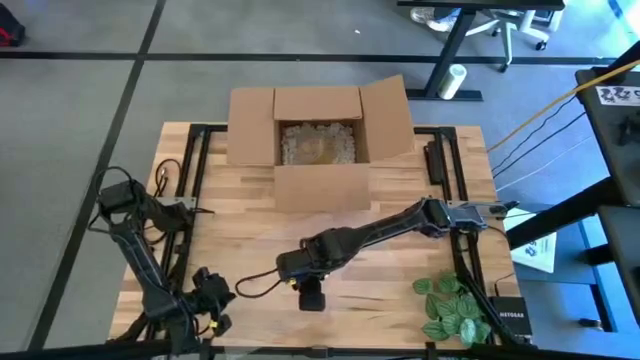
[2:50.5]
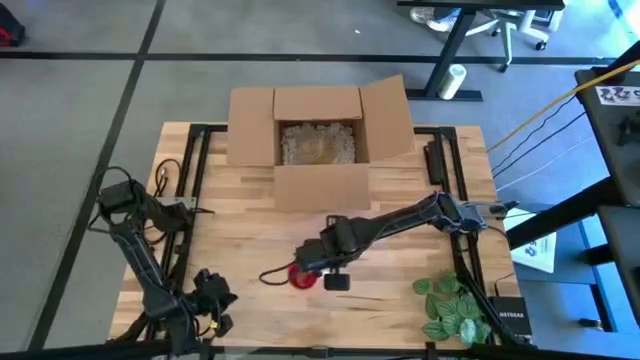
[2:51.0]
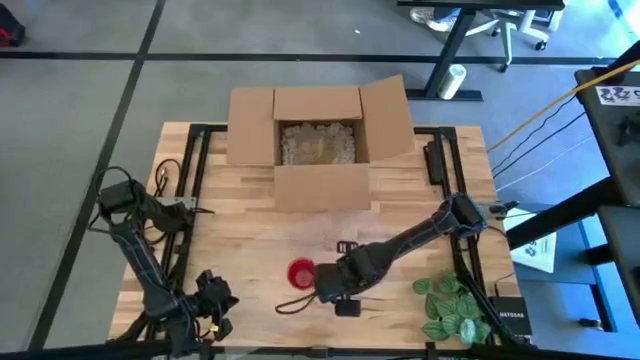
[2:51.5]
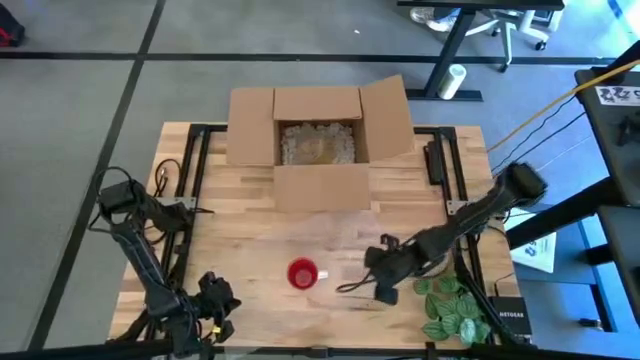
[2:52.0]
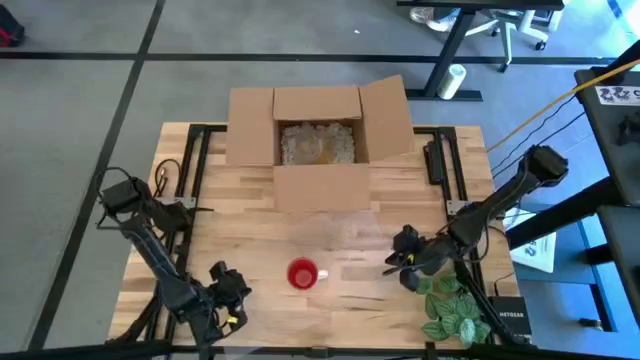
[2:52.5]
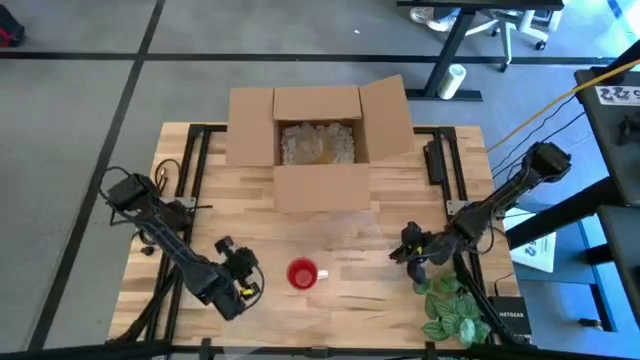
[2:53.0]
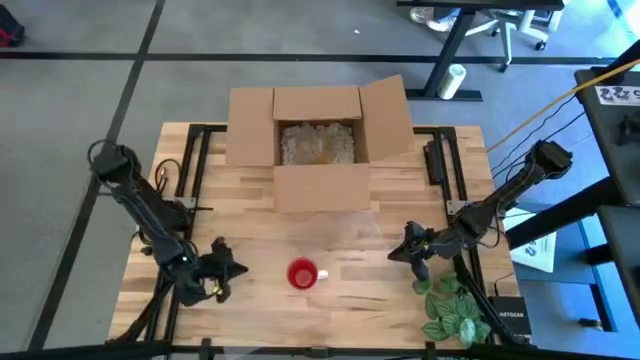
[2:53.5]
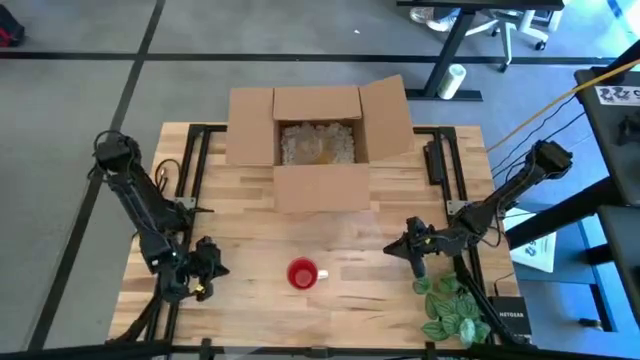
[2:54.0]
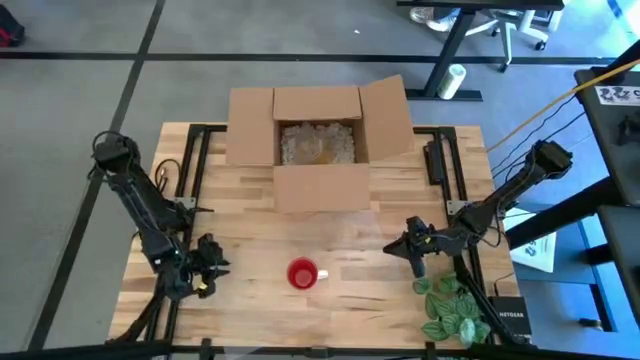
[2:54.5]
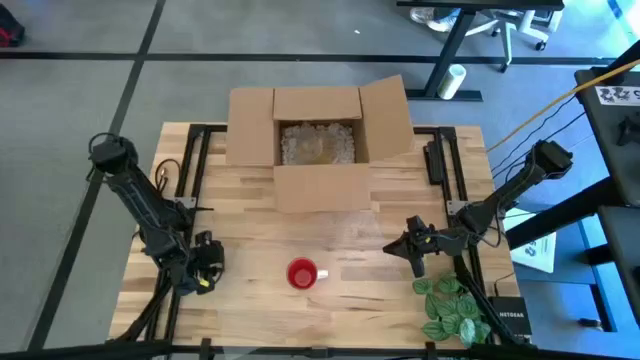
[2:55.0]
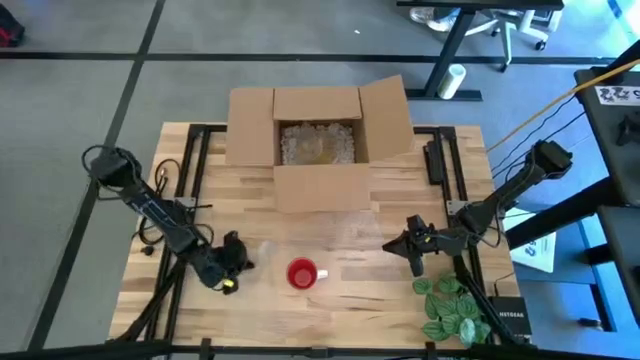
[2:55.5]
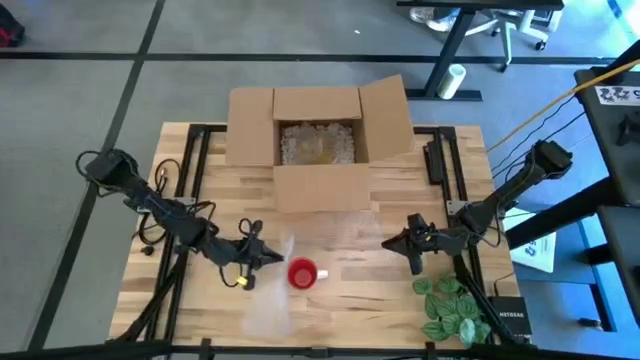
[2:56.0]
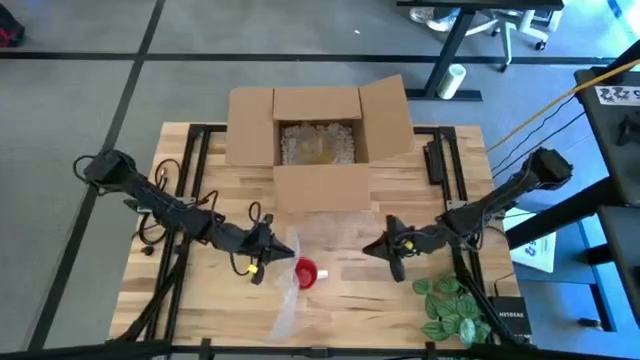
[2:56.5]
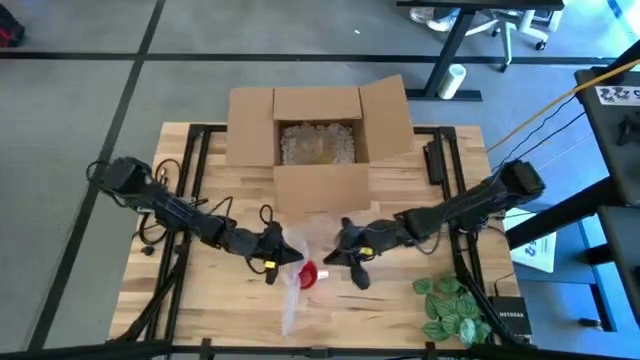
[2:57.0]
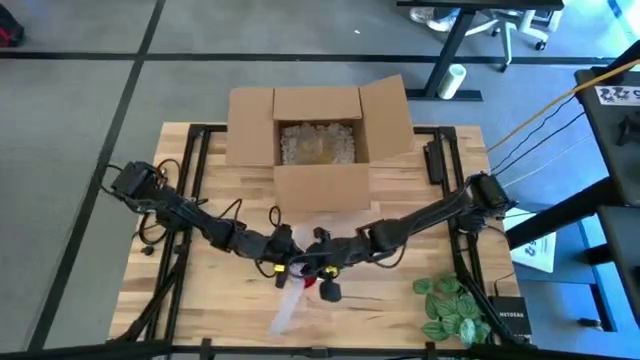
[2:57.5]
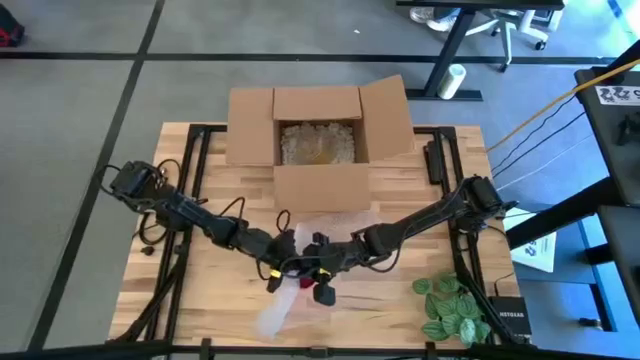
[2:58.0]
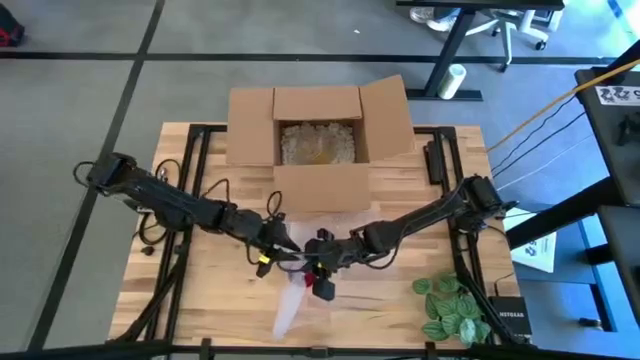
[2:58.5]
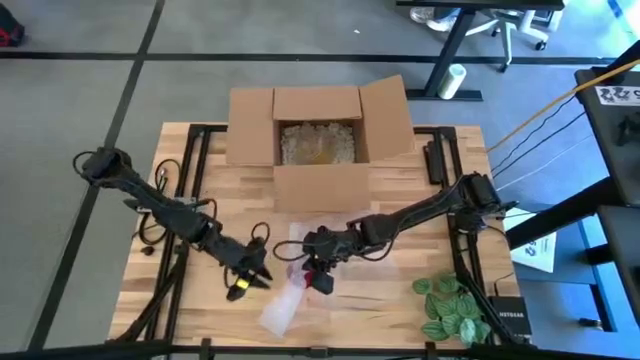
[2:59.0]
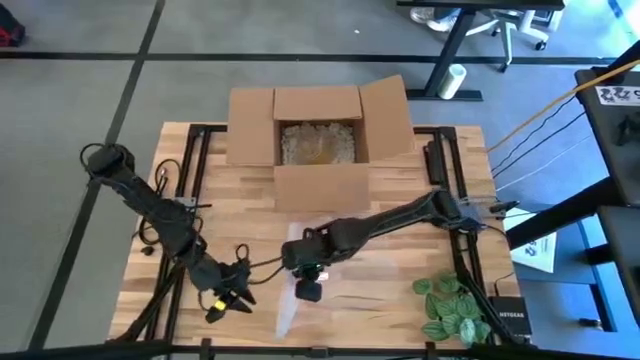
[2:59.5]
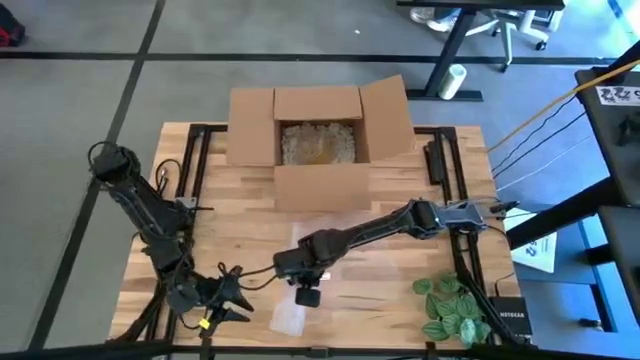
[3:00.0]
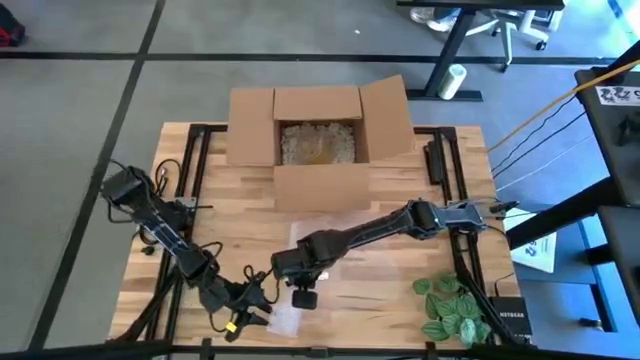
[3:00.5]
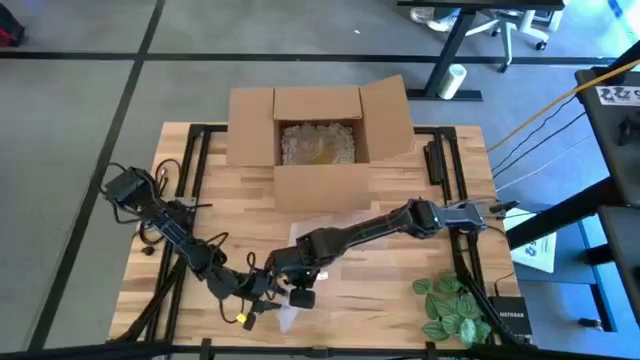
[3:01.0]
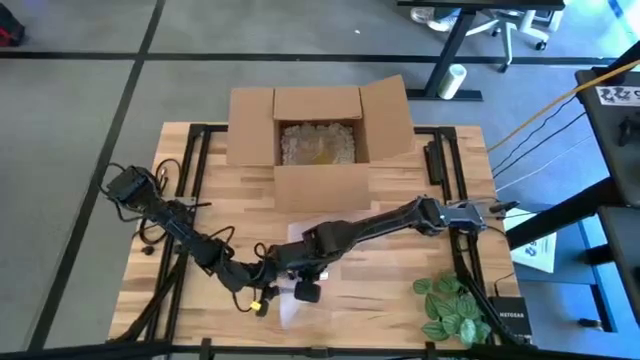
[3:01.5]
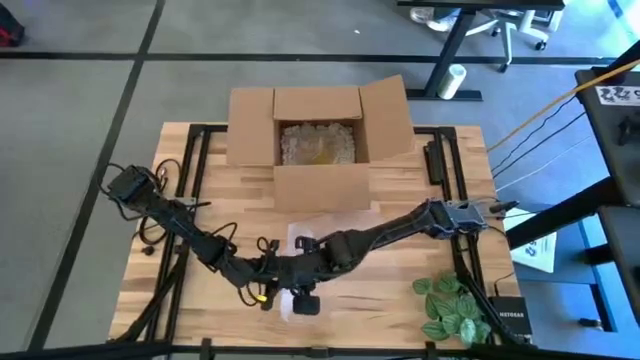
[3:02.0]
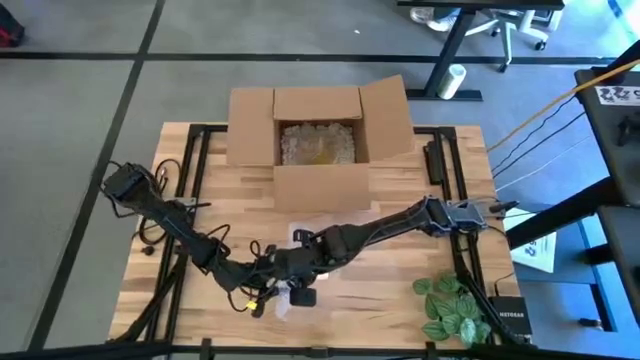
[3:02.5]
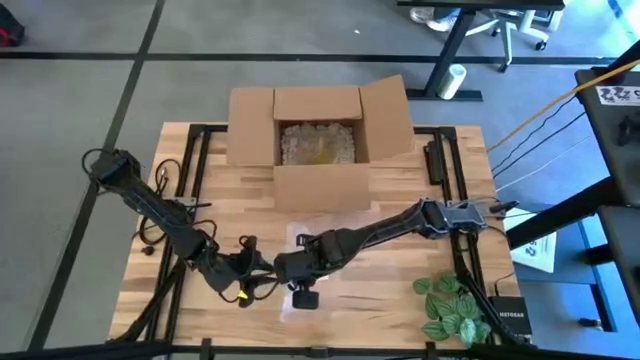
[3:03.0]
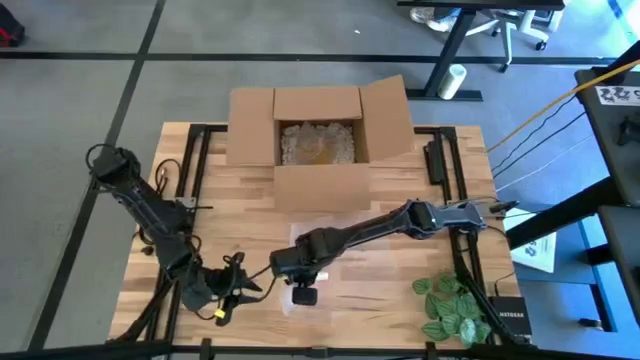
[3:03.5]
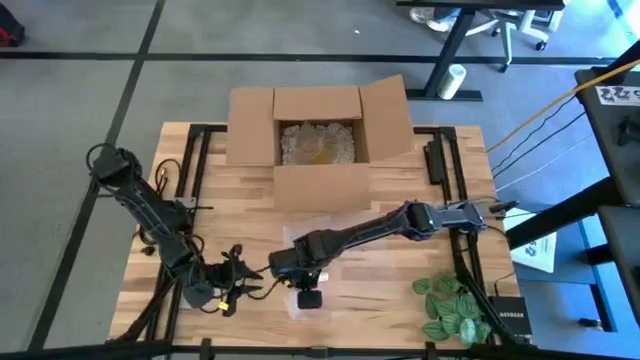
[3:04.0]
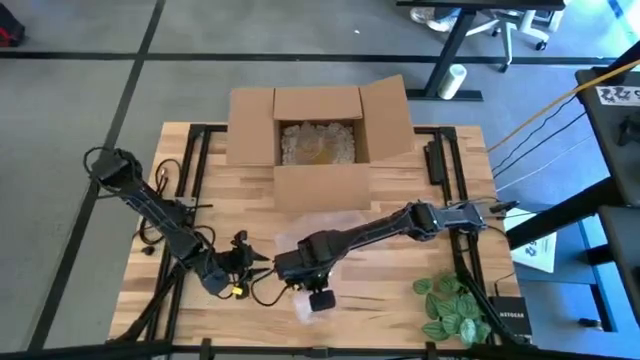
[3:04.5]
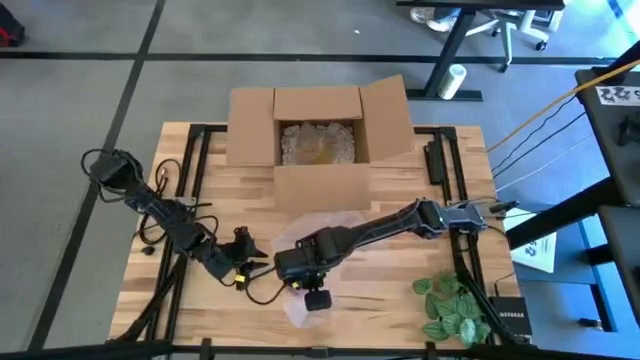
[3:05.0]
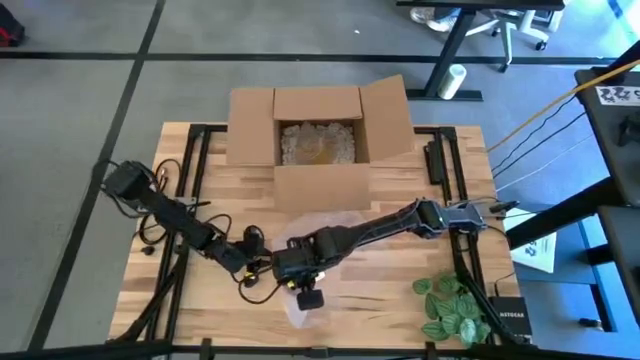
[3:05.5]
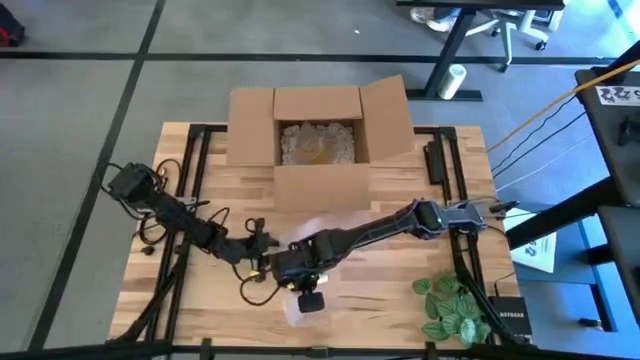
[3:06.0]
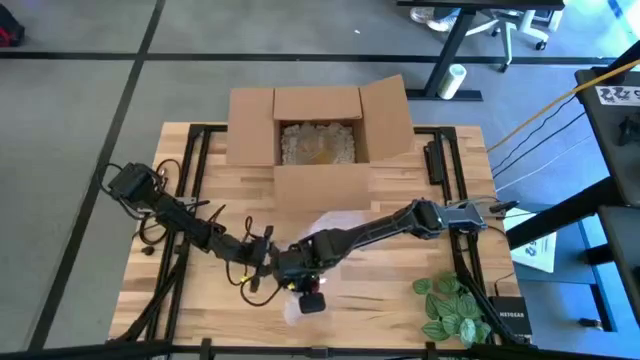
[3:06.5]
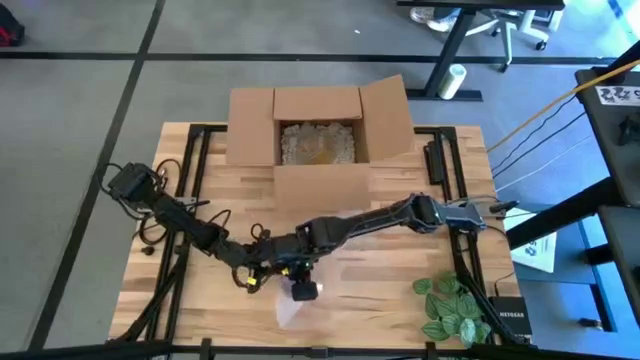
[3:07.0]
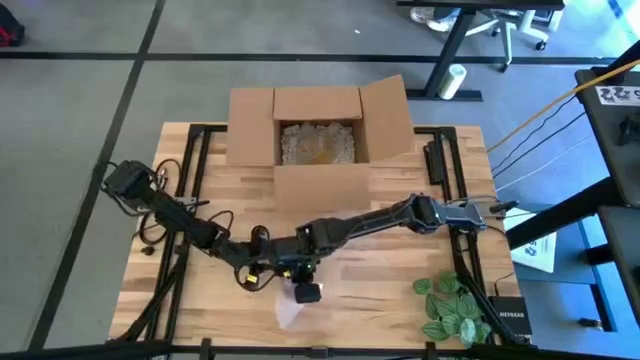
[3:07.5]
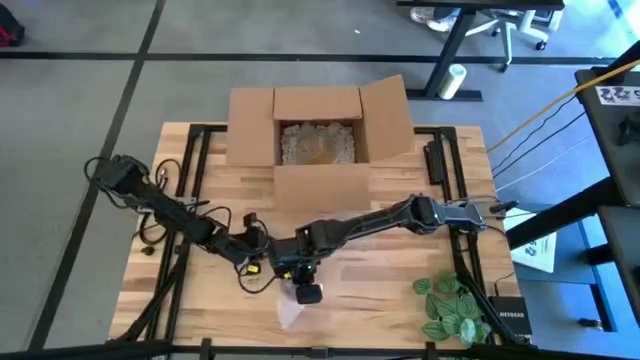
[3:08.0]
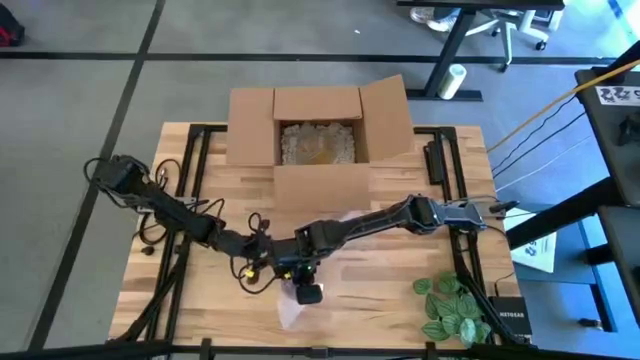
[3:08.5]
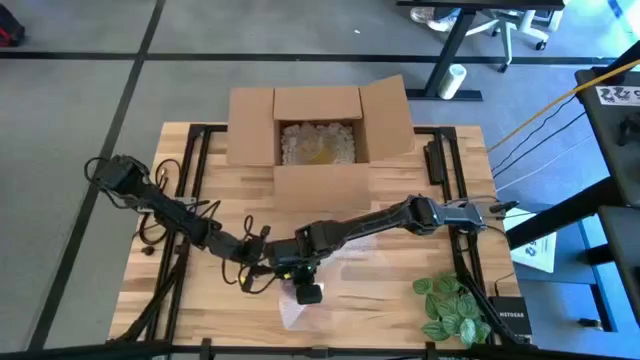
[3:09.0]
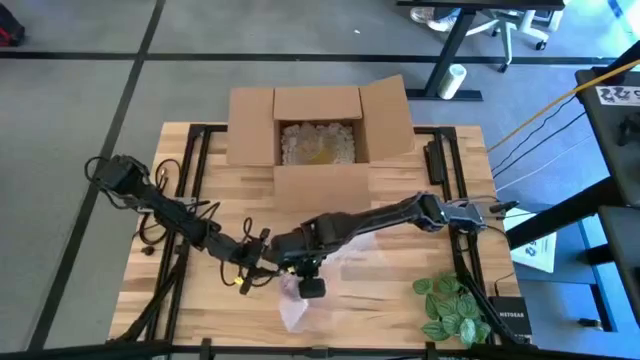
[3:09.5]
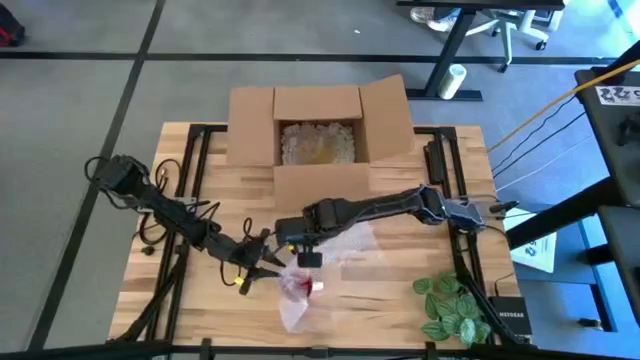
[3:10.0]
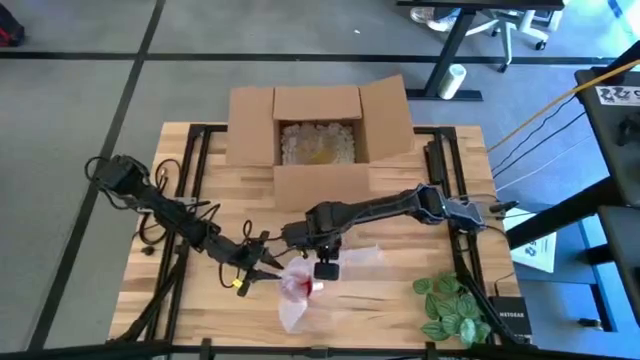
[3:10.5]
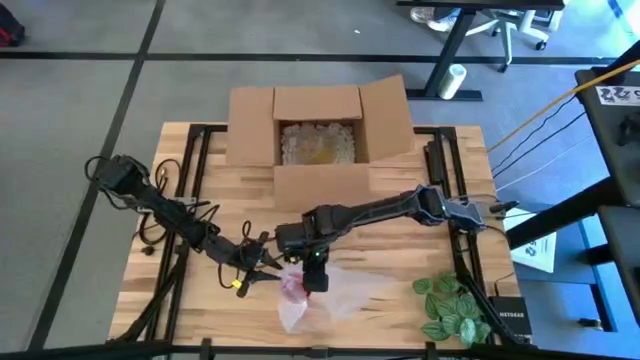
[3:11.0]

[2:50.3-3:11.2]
Task: wrap mug
Wrap the red mug using the bubble wrap
